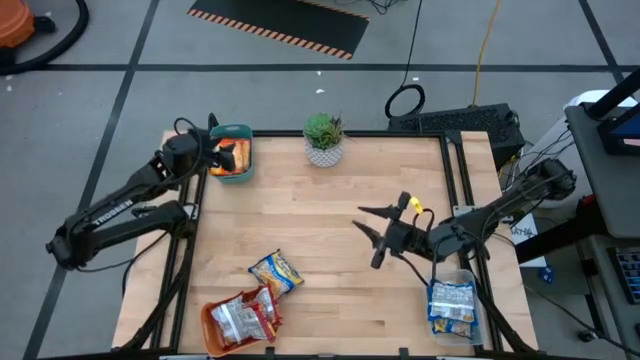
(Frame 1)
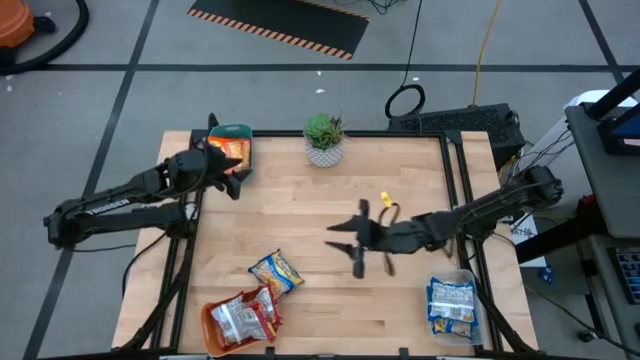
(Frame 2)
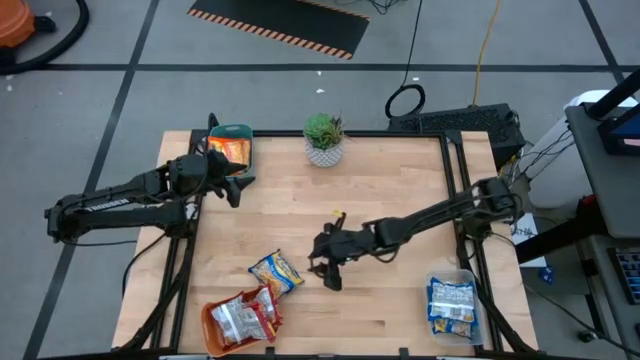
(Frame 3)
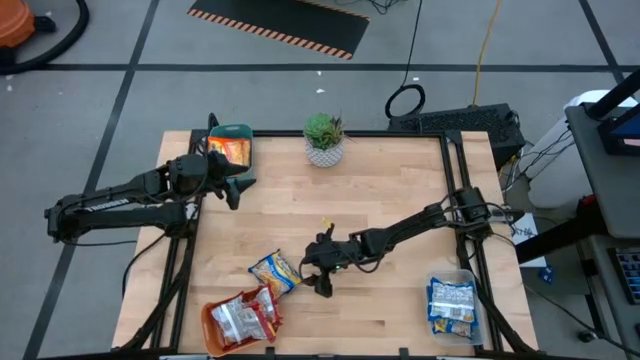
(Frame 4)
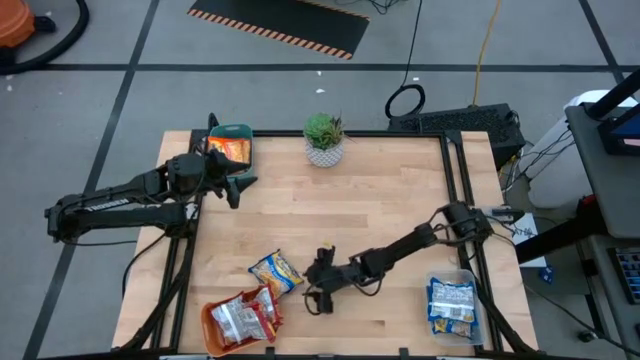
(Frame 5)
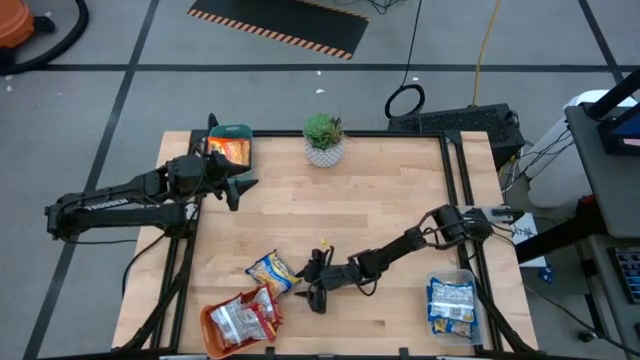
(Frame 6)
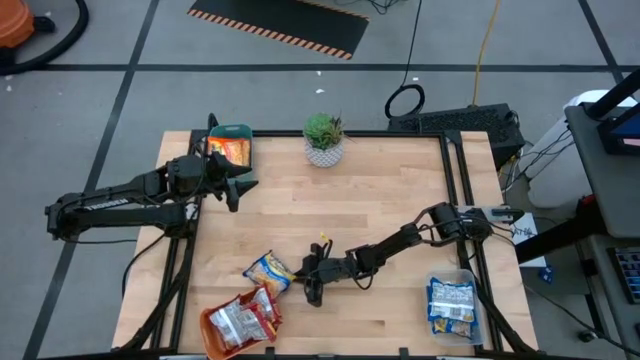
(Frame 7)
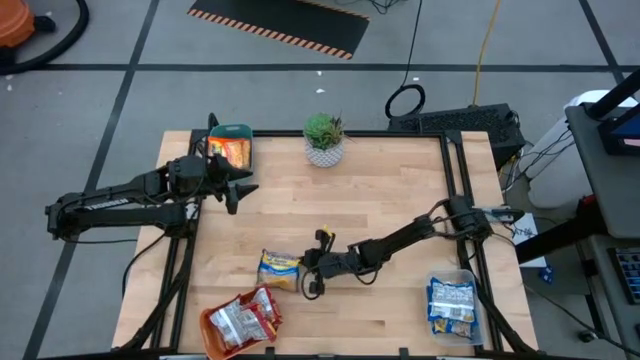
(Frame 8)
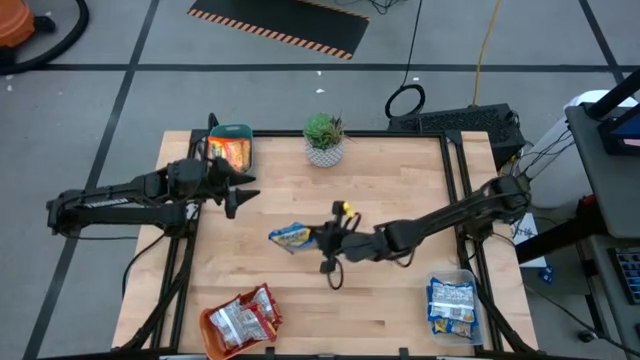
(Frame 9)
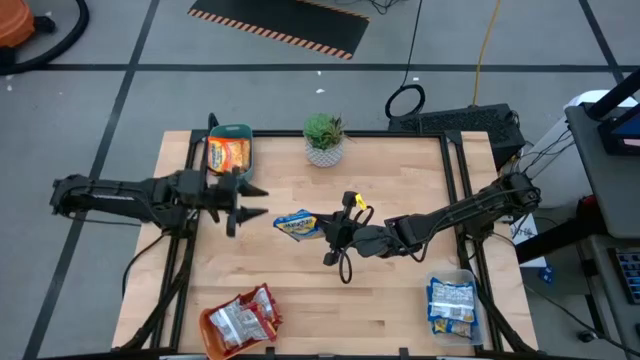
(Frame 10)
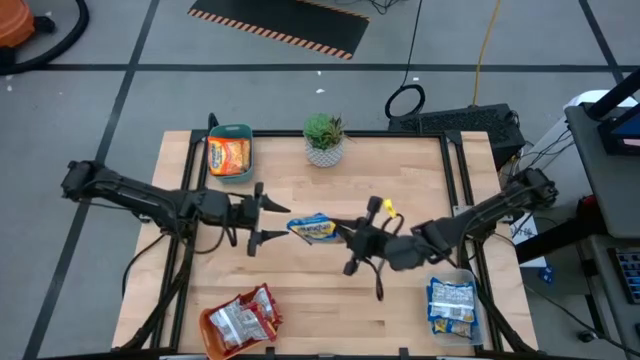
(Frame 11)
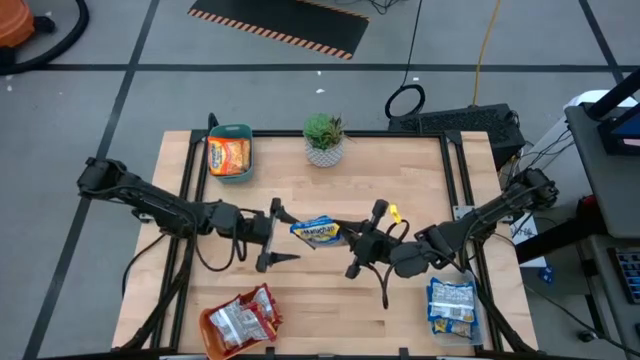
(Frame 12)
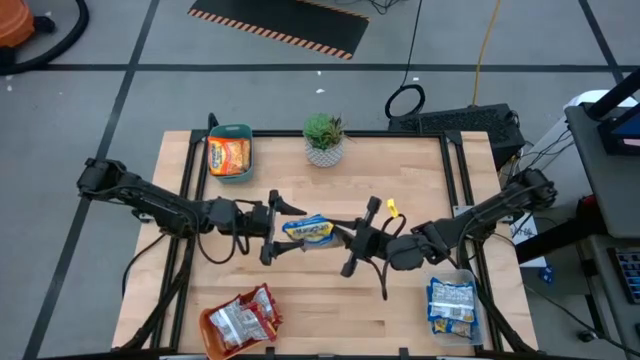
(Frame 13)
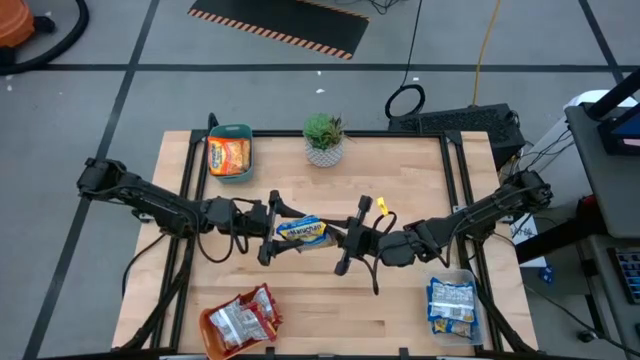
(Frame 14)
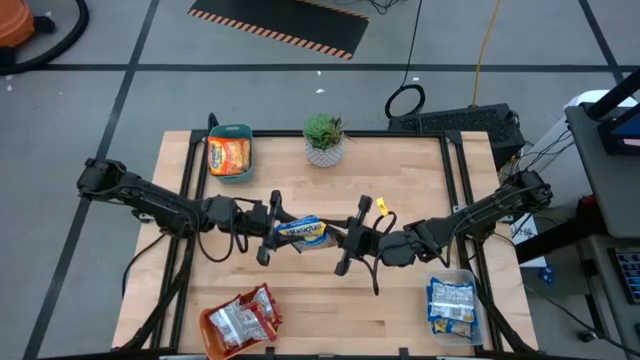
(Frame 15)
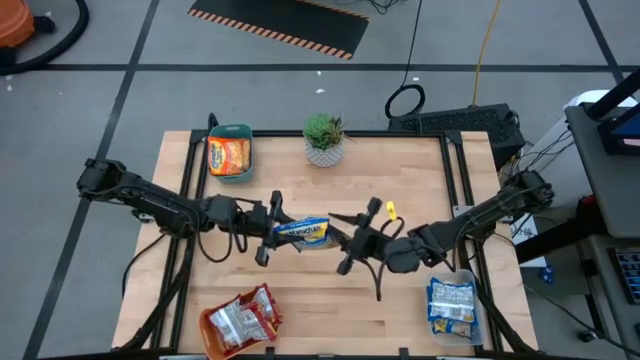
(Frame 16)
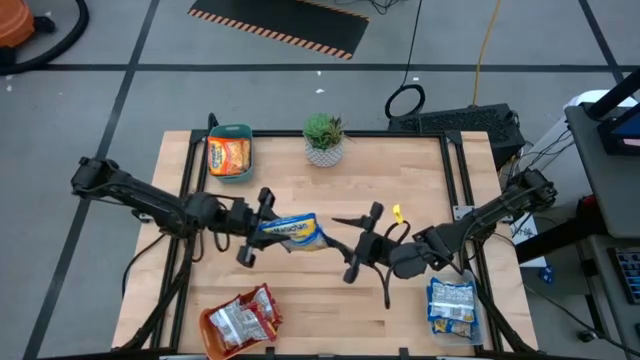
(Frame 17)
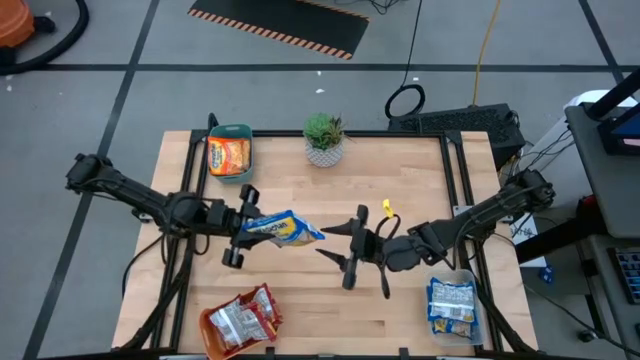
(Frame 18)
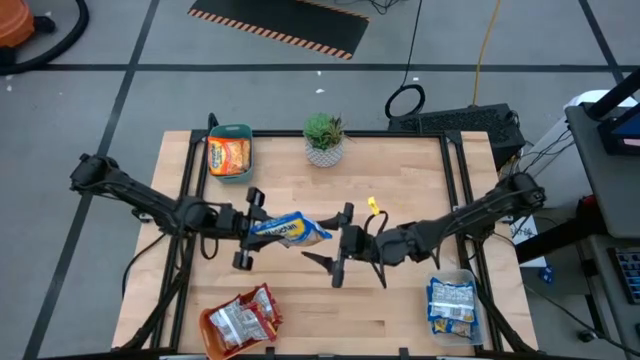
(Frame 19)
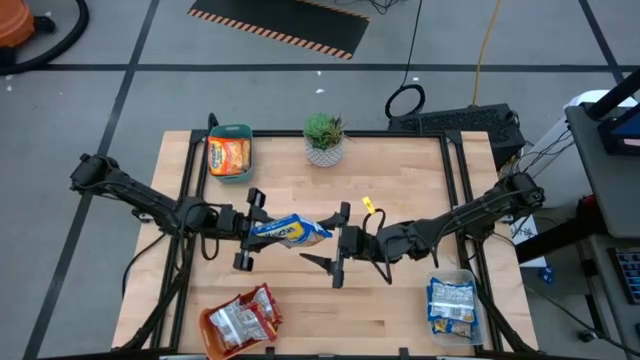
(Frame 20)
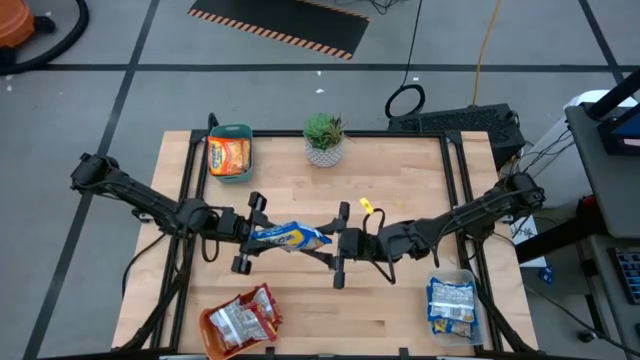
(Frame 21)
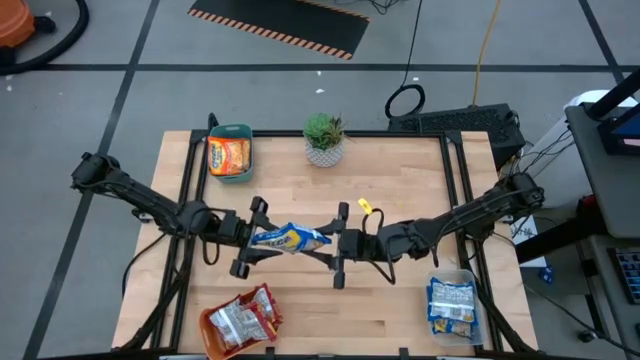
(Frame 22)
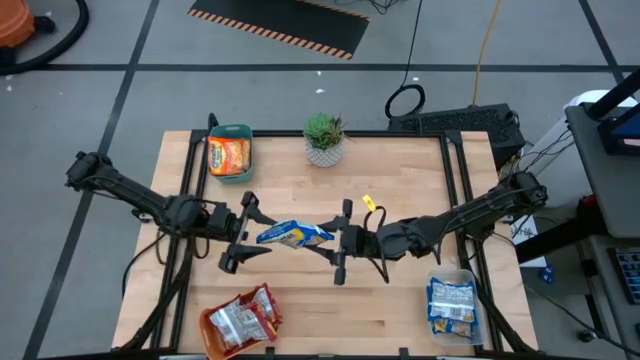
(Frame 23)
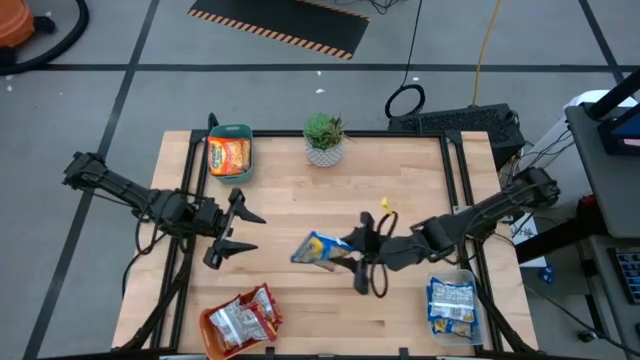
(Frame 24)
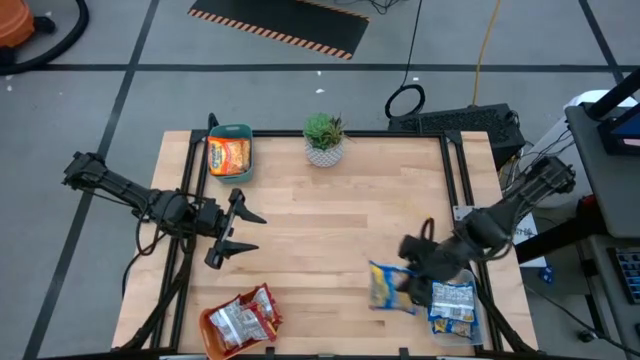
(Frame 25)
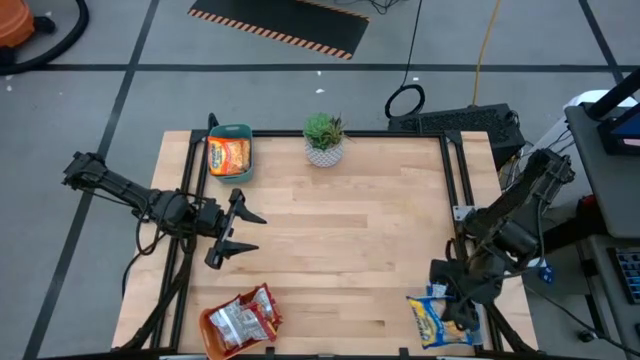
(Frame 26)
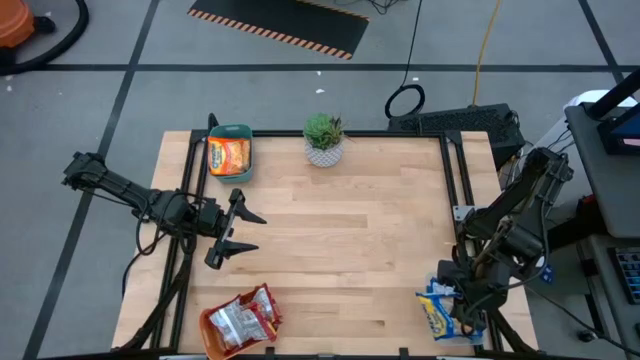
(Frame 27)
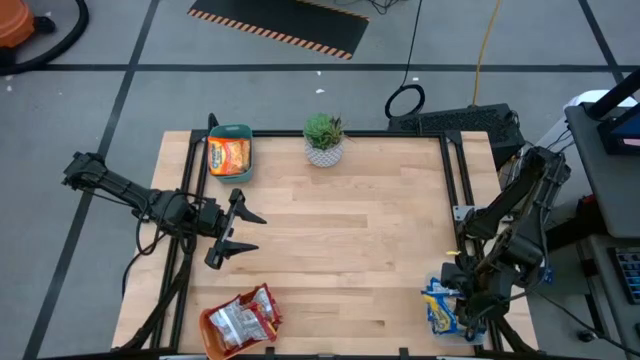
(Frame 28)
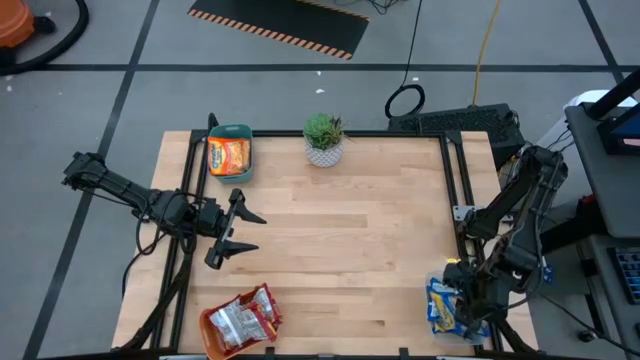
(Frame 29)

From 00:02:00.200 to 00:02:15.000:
Task: Sort Maruchan noodles
Put the blue noodle pack into the transparent bin

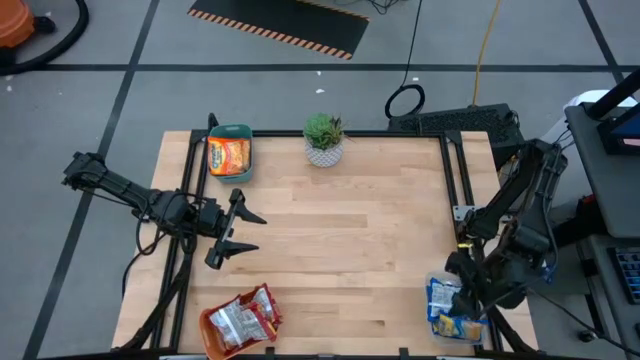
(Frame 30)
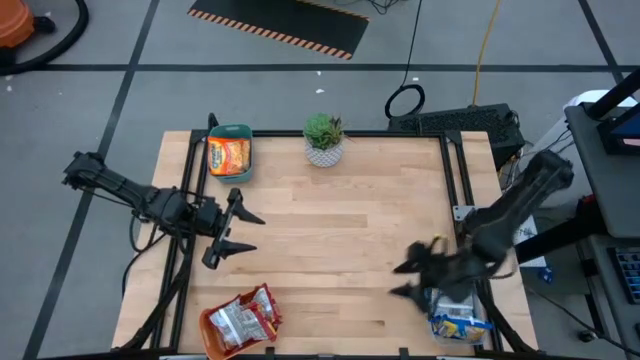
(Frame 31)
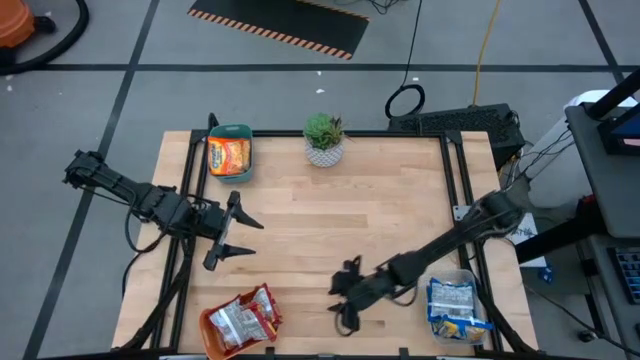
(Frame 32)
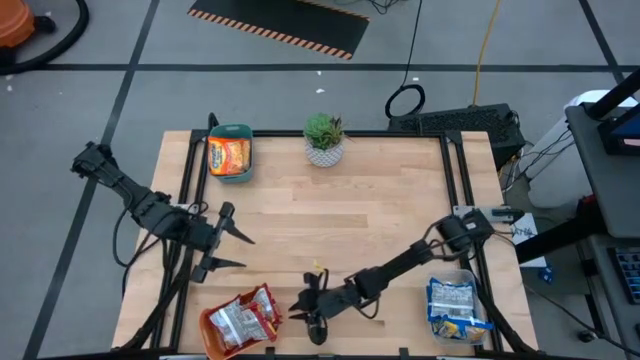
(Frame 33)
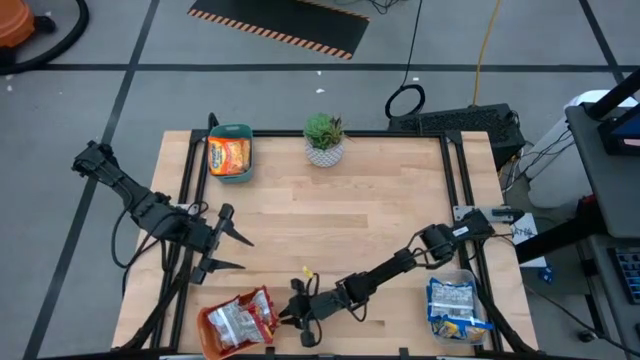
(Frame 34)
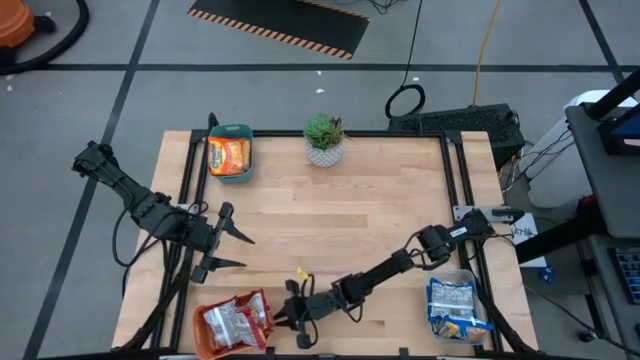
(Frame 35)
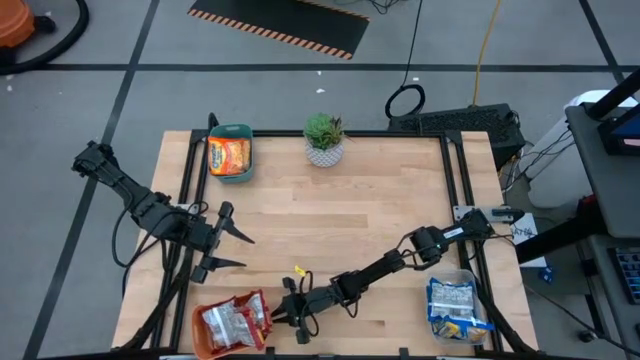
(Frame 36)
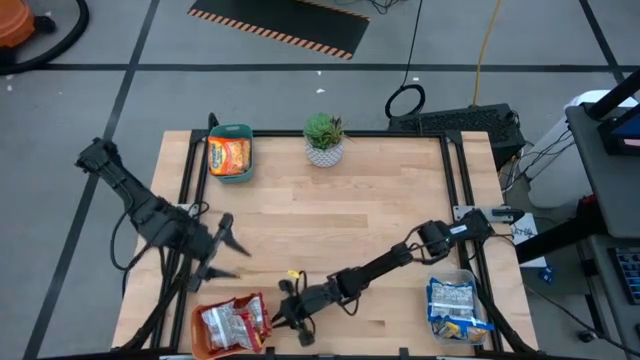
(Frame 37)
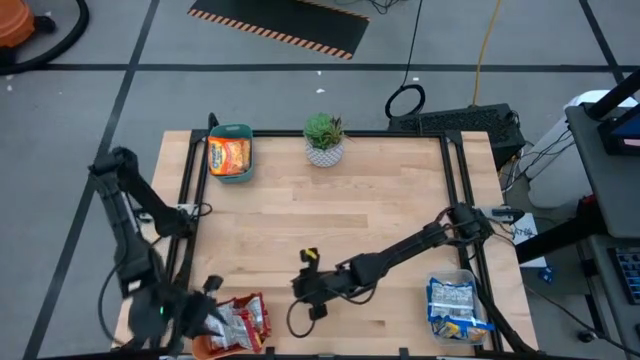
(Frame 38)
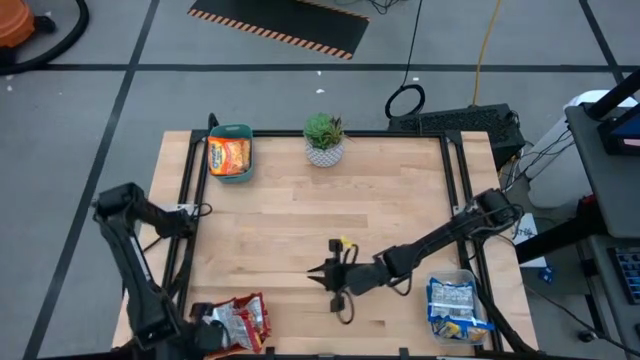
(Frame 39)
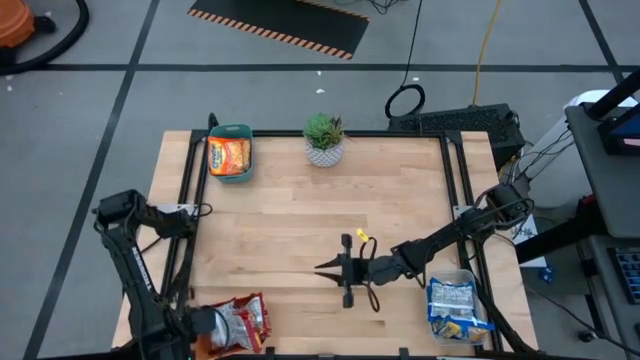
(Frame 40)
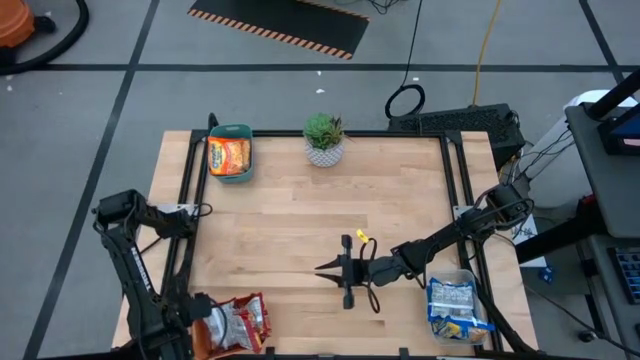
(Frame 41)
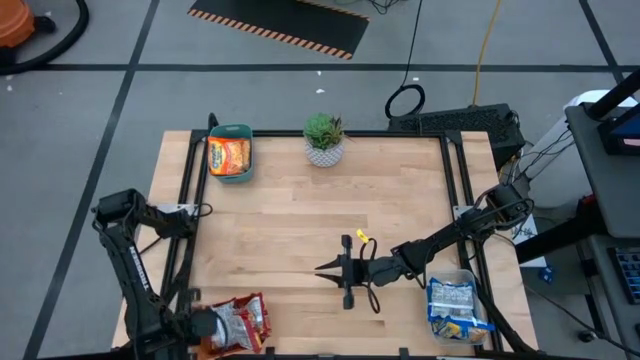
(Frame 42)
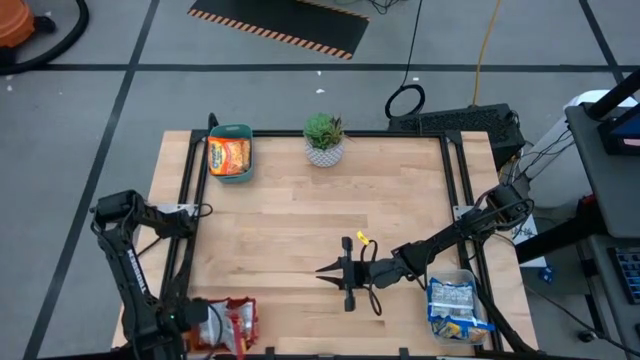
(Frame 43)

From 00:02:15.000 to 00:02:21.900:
Adjust the orange bin
